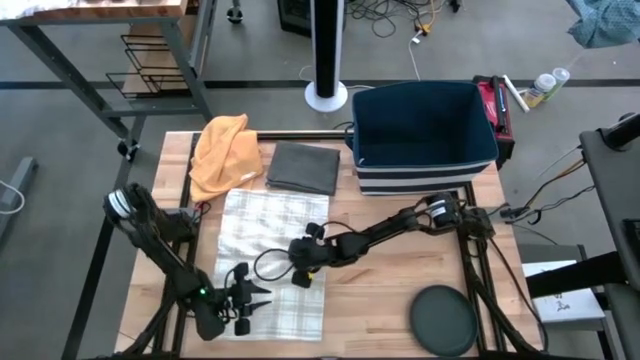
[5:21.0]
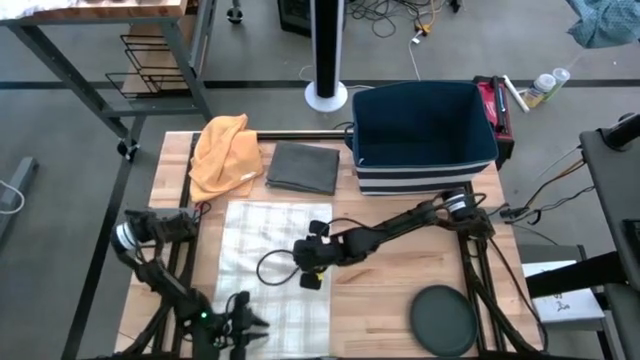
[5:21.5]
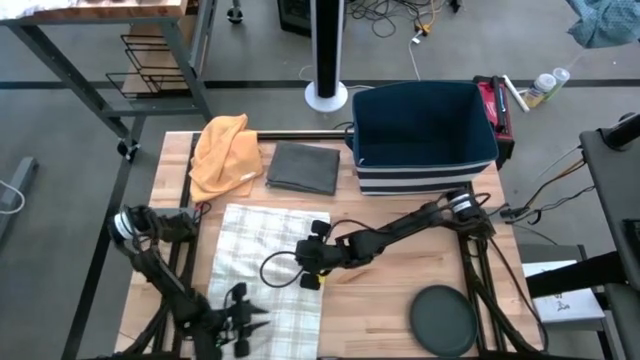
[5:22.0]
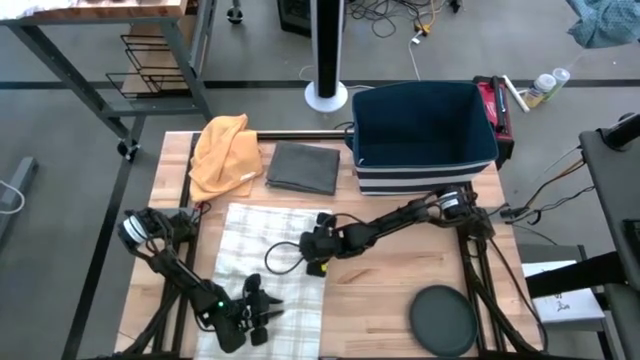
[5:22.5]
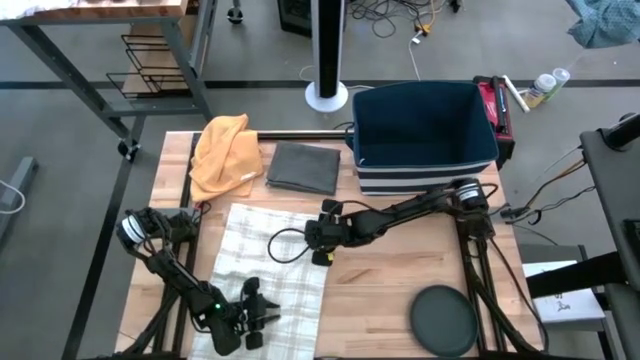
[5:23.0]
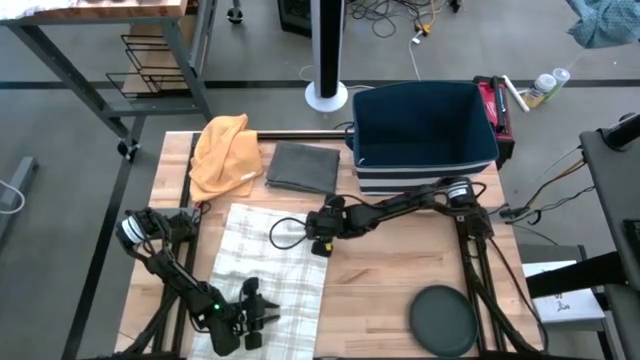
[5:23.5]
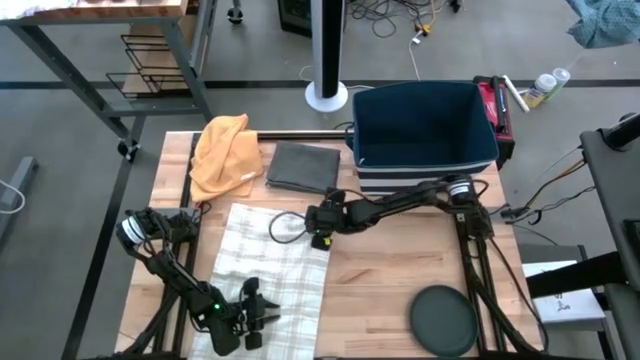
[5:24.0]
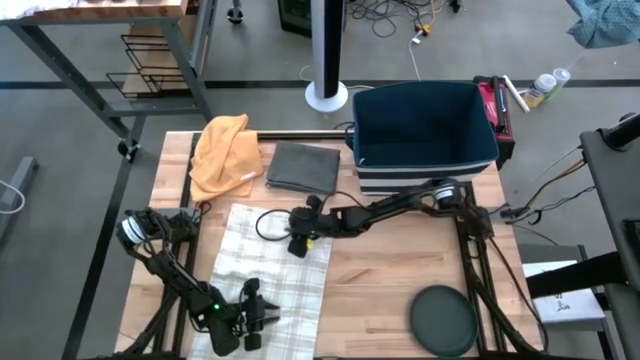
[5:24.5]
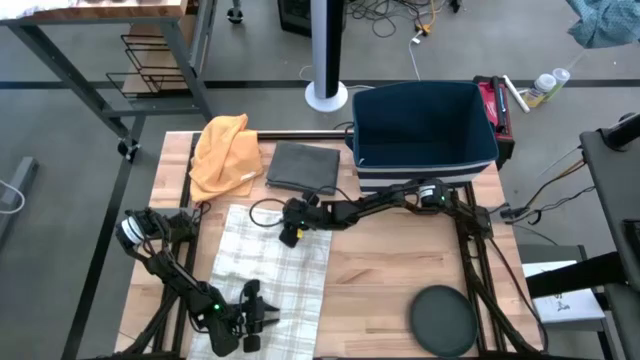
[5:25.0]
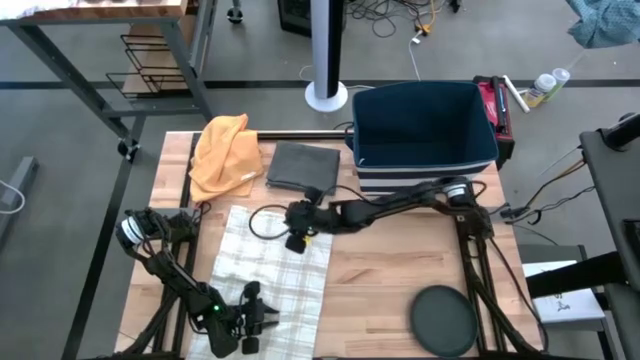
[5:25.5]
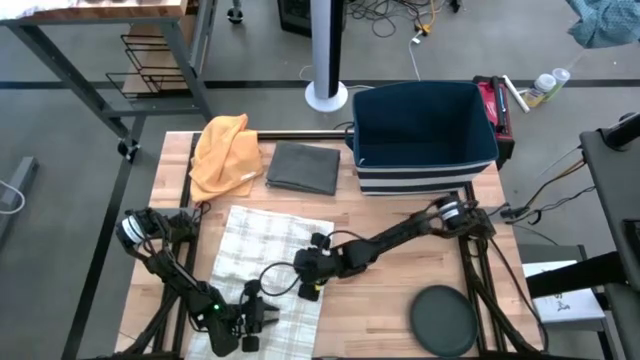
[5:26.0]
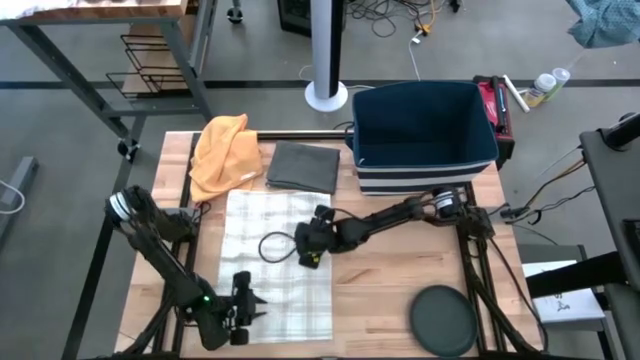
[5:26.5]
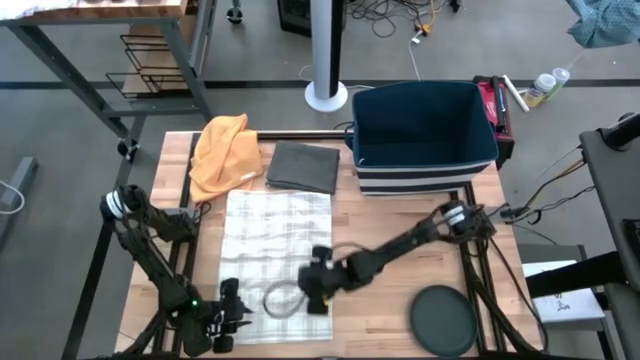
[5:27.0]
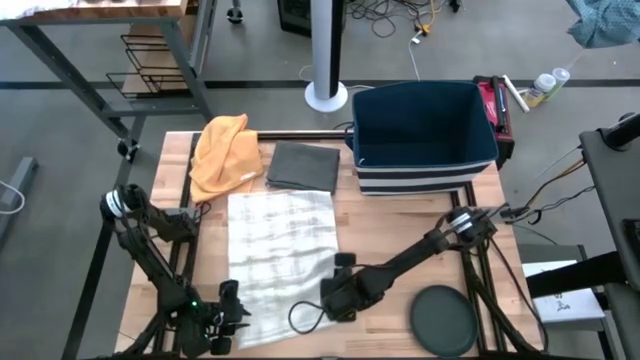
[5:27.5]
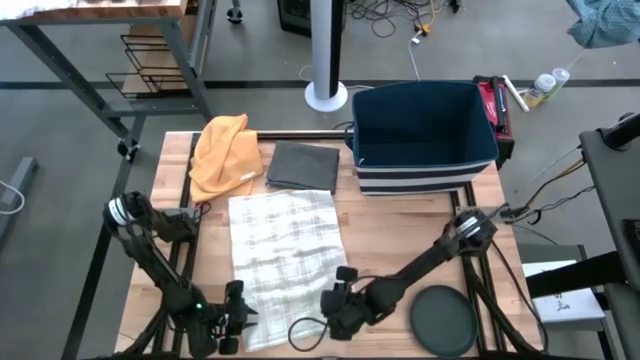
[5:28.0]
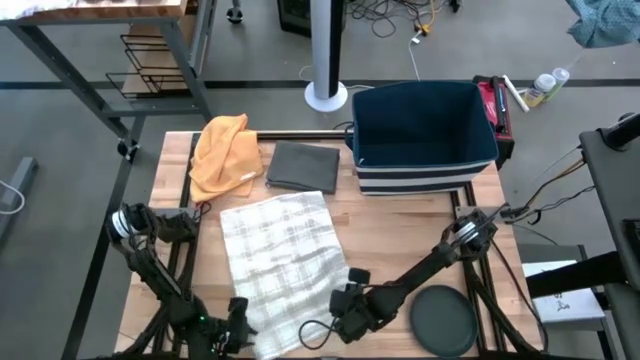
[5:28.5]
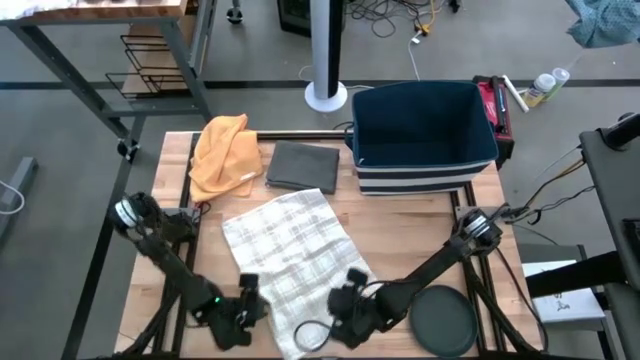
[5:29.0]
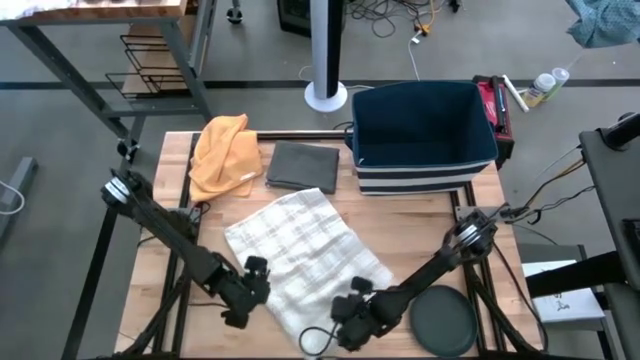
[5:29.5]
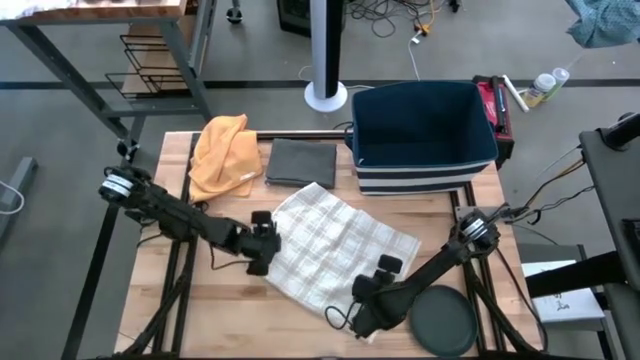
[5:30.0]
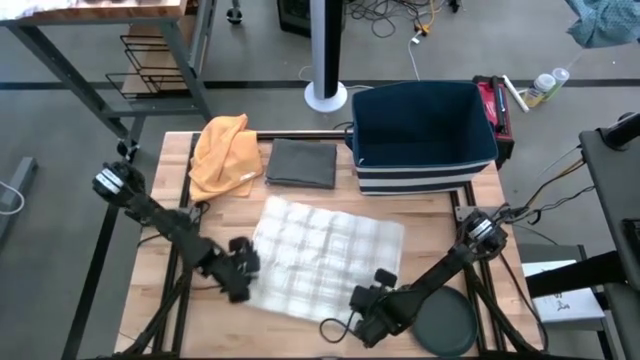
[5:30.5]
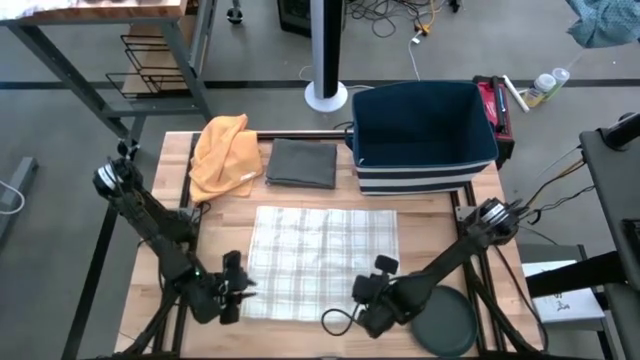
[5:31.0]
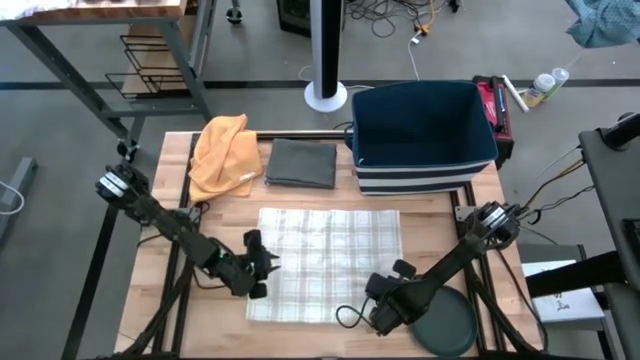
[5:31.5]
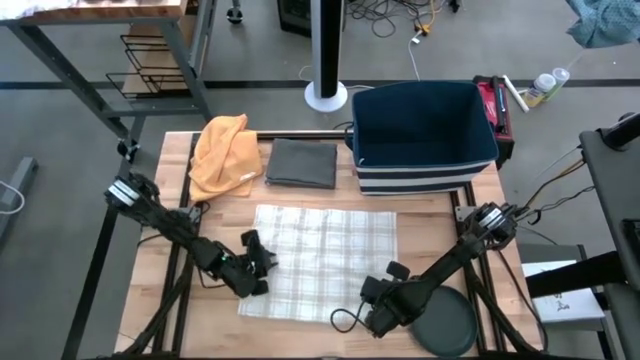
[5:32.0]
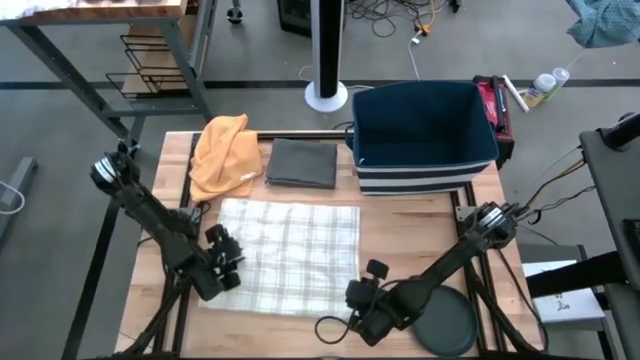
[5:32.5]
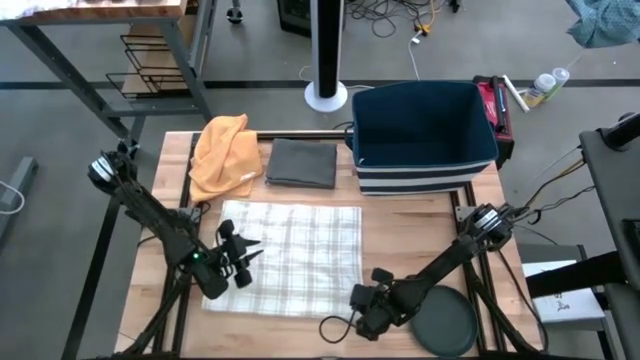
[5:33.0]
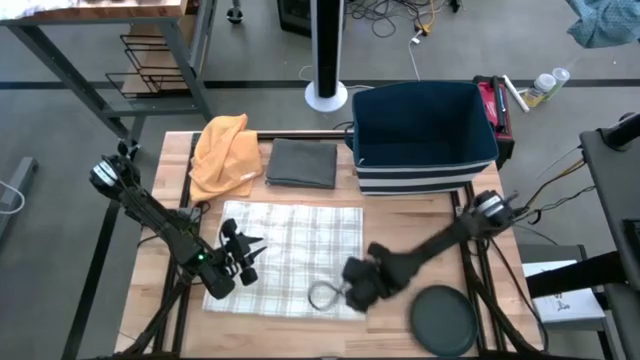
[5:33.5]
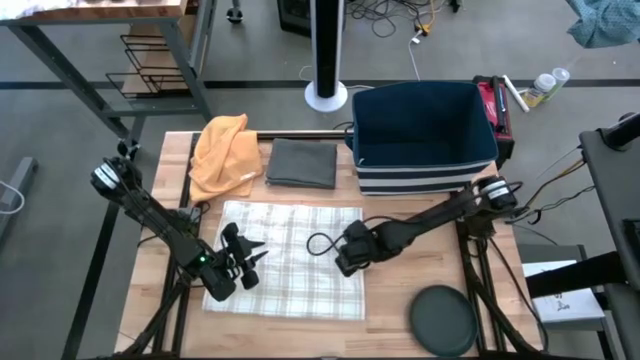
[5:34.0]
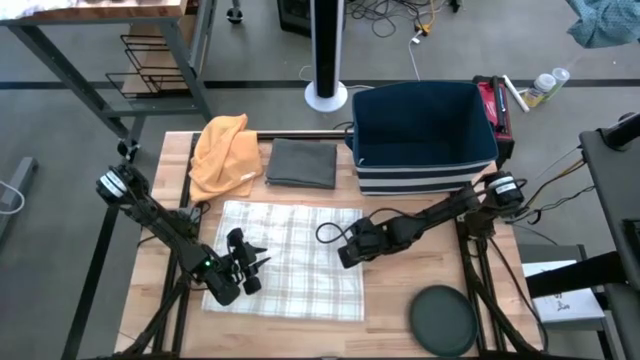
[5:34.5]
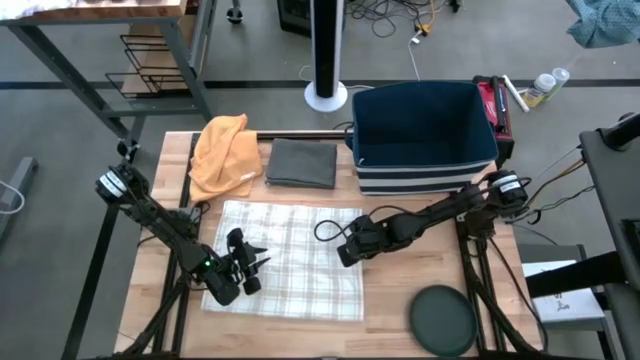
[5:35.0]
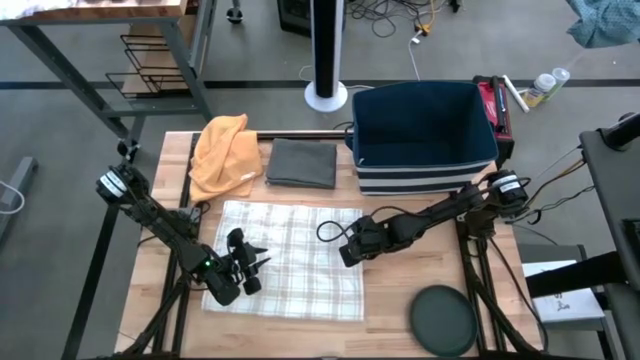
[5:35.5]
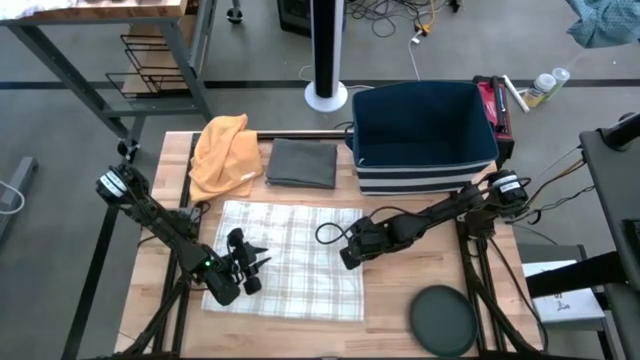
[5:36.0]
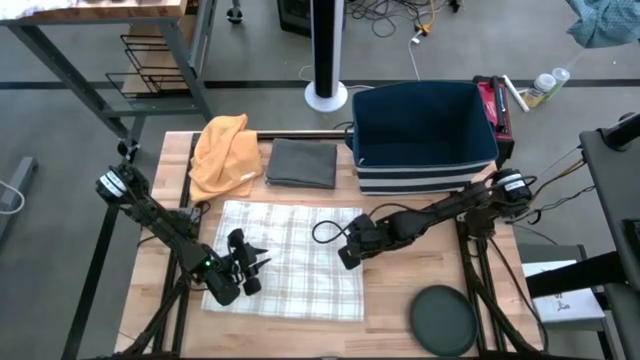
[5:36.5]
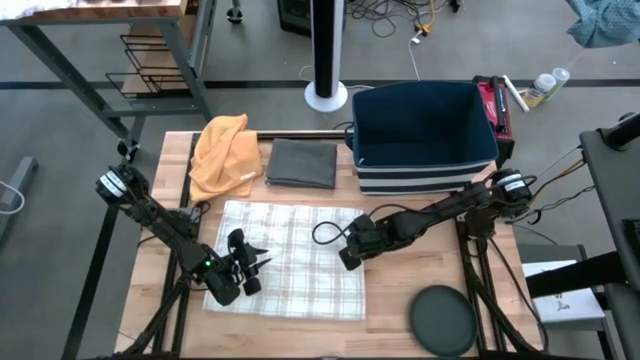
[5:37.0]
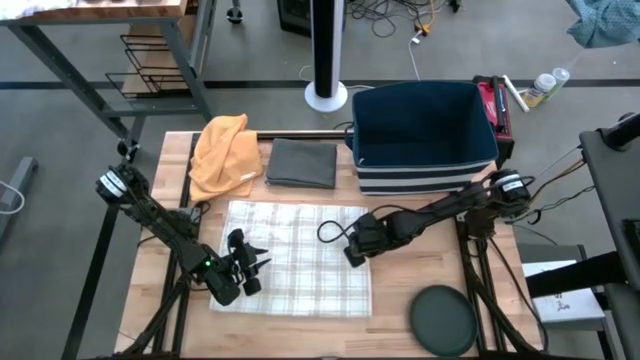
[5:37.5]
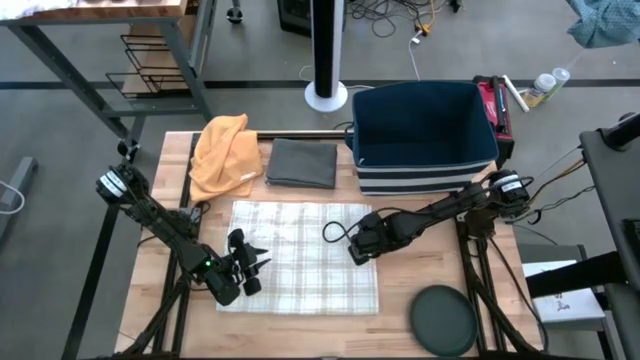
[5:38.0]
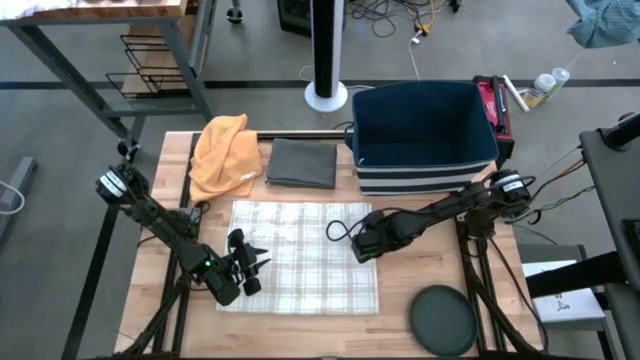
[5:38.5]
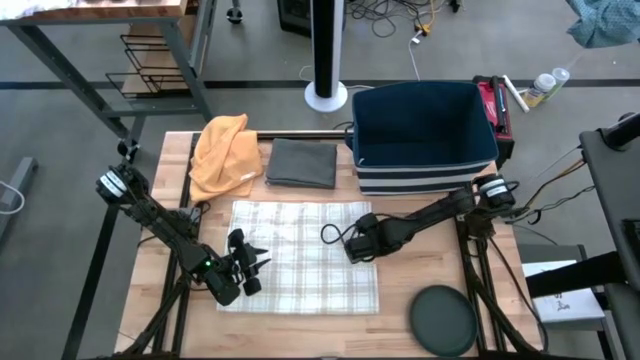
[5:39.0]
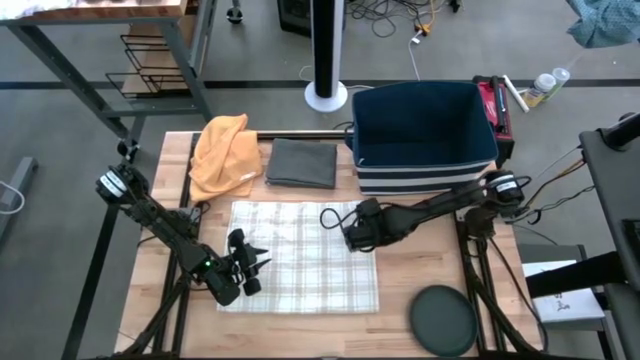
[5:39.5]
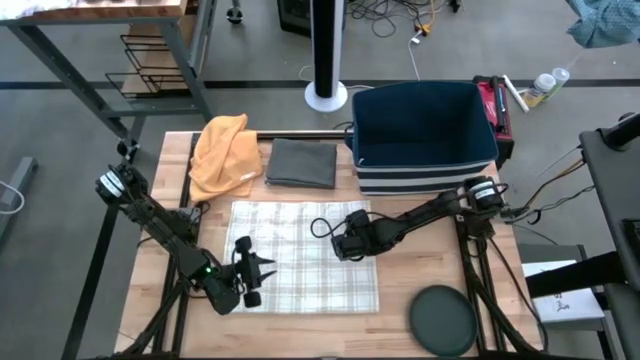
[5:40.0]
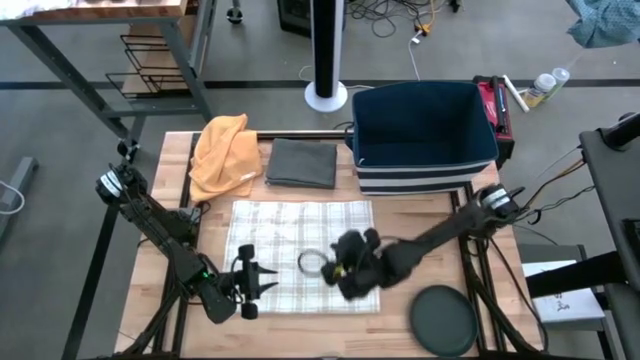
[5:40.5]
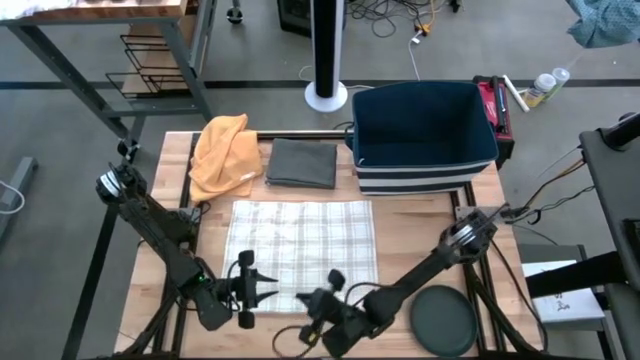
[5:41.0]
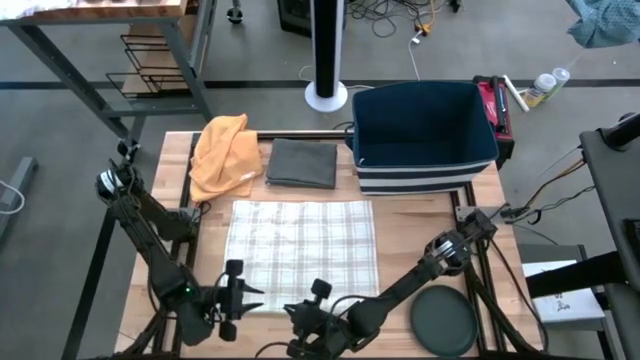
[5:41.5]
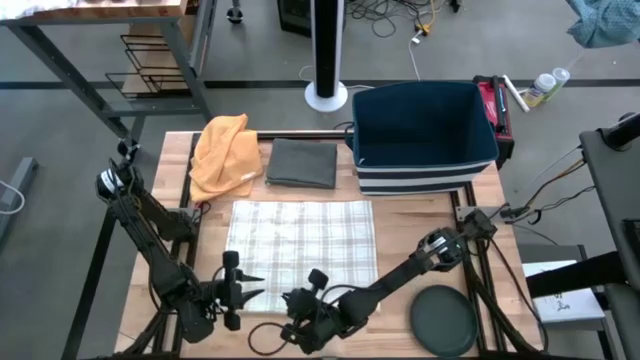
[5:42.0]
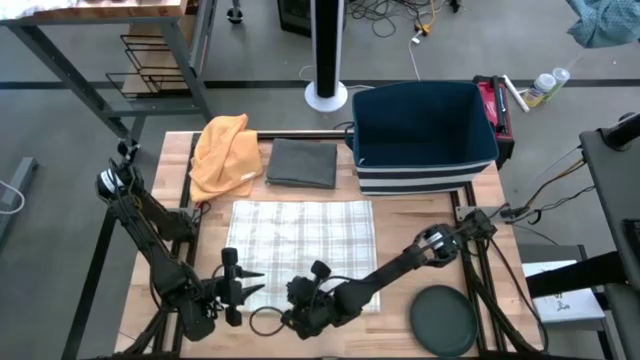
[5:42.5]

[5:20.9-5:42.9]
Task: Fold kitchen towel into neat rectangle
Fold the white patterned towel
